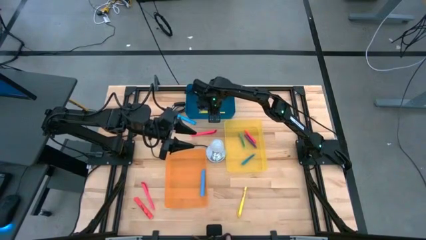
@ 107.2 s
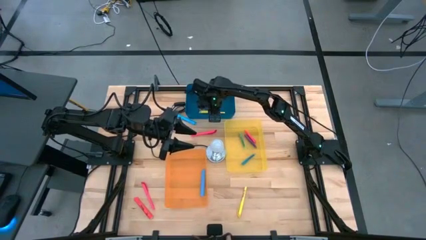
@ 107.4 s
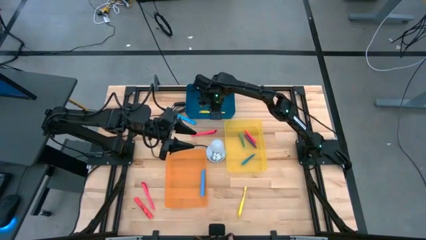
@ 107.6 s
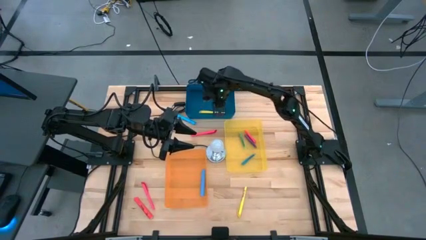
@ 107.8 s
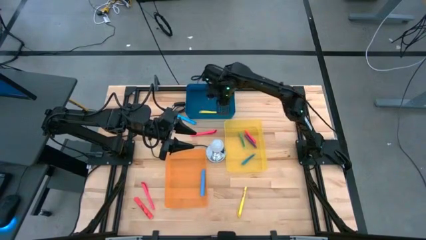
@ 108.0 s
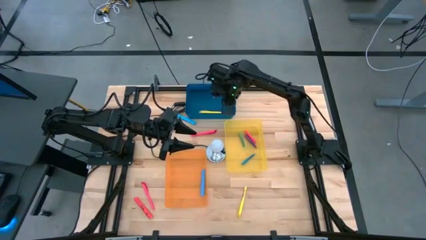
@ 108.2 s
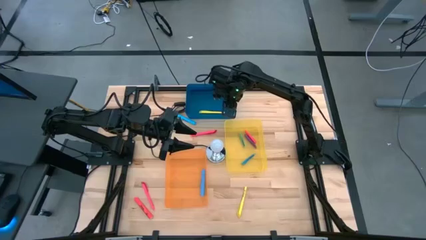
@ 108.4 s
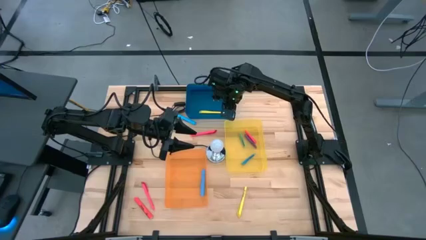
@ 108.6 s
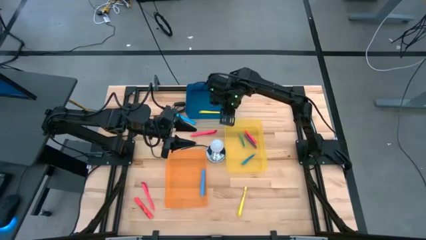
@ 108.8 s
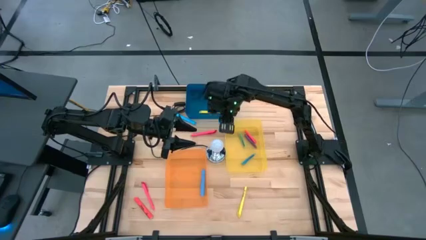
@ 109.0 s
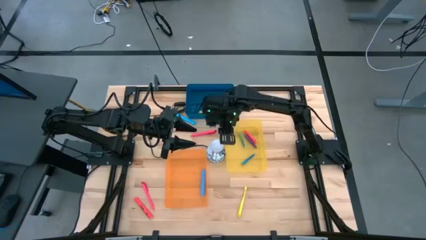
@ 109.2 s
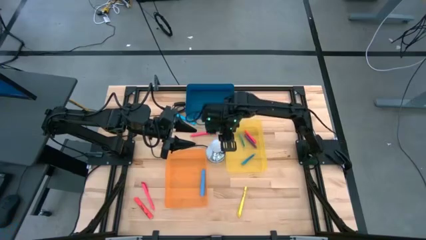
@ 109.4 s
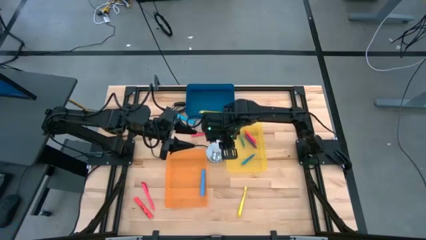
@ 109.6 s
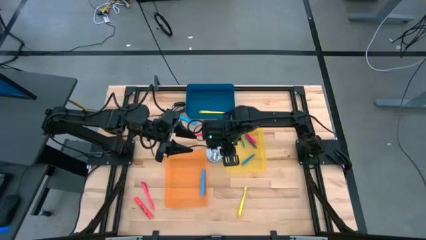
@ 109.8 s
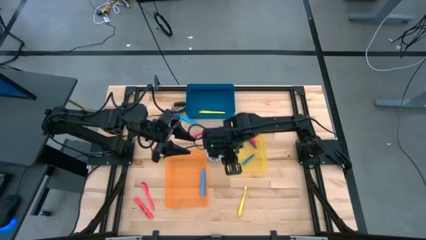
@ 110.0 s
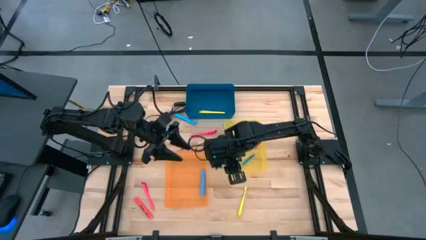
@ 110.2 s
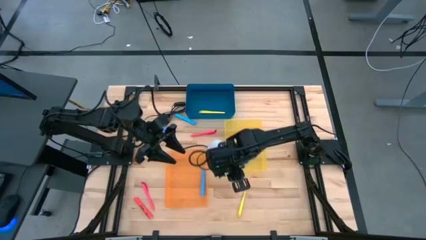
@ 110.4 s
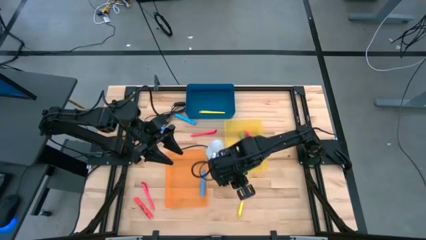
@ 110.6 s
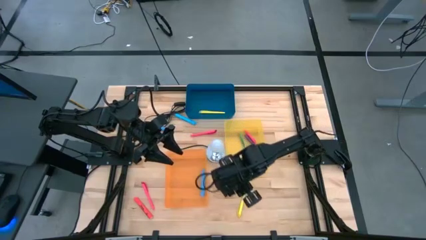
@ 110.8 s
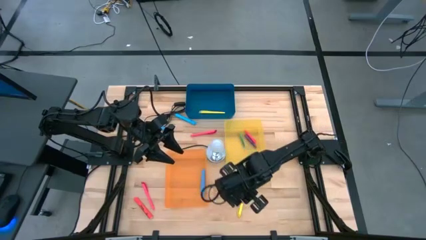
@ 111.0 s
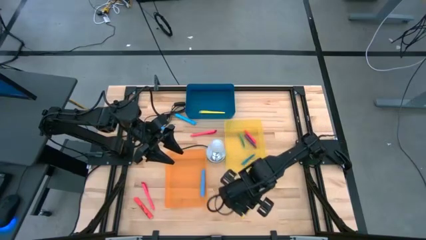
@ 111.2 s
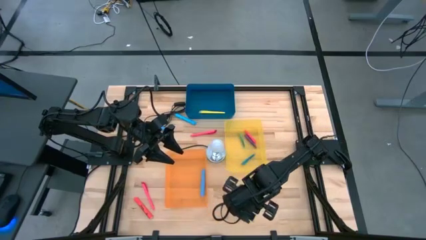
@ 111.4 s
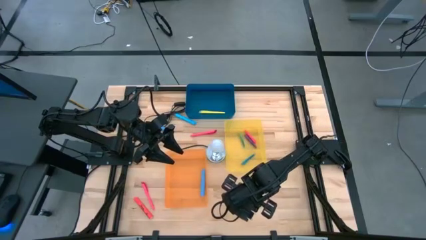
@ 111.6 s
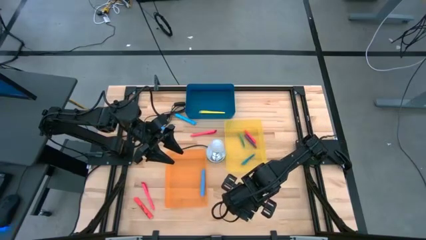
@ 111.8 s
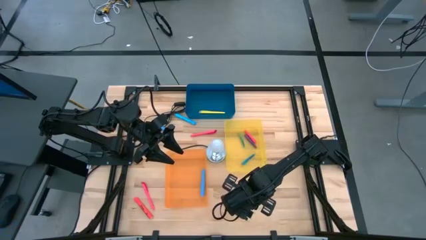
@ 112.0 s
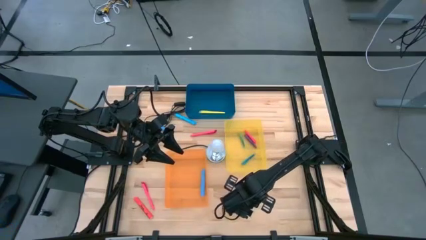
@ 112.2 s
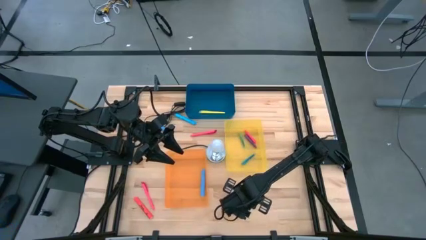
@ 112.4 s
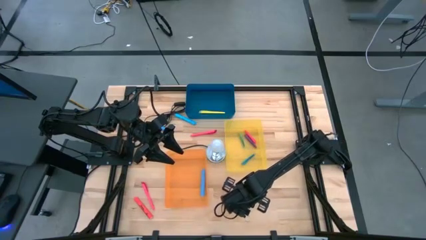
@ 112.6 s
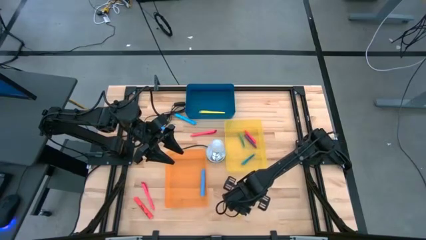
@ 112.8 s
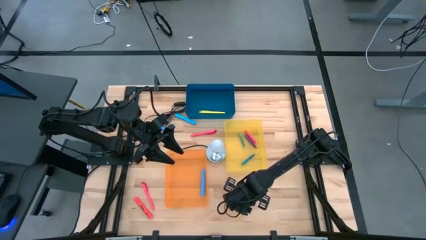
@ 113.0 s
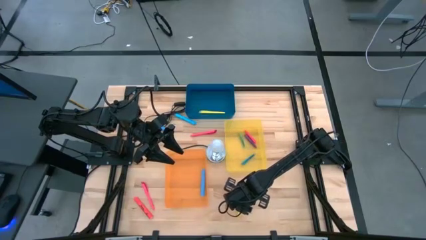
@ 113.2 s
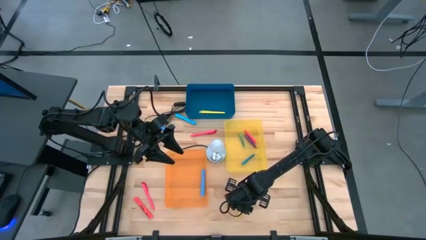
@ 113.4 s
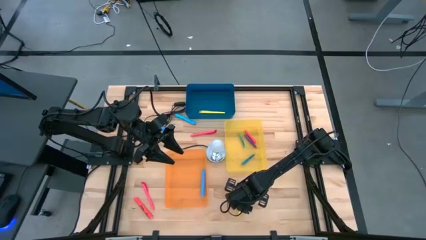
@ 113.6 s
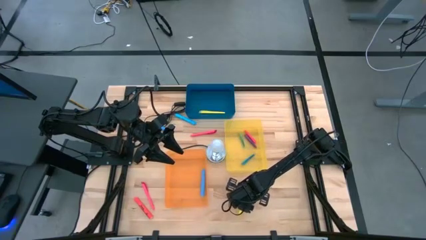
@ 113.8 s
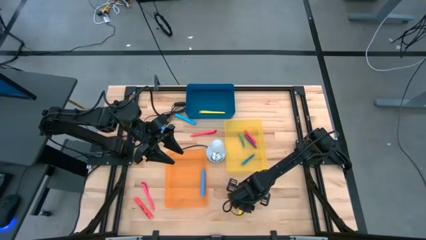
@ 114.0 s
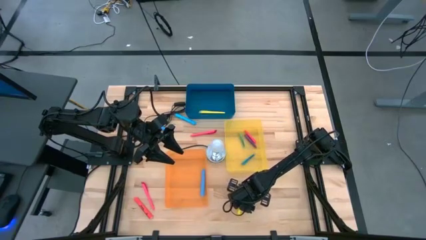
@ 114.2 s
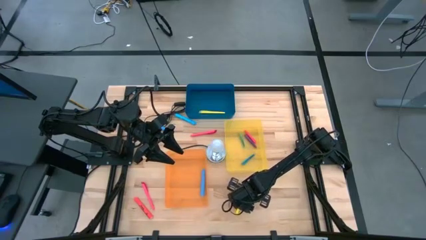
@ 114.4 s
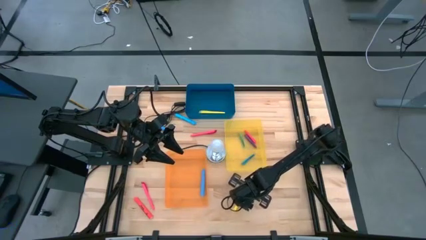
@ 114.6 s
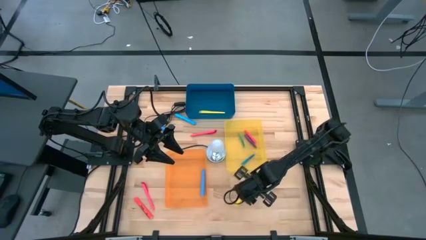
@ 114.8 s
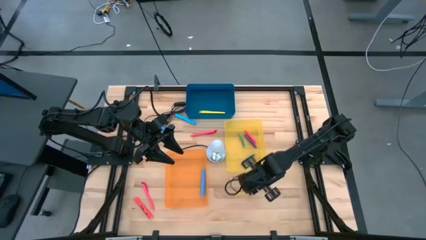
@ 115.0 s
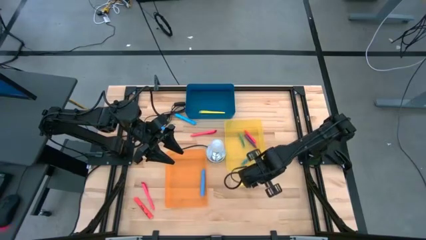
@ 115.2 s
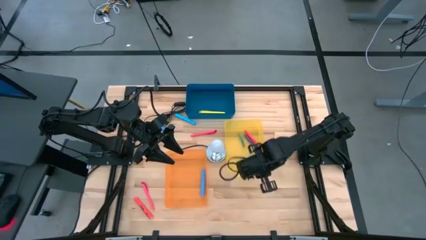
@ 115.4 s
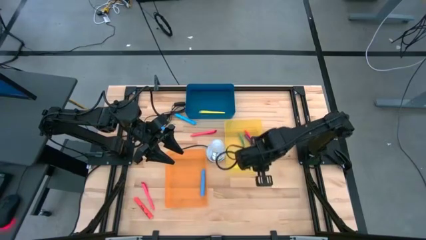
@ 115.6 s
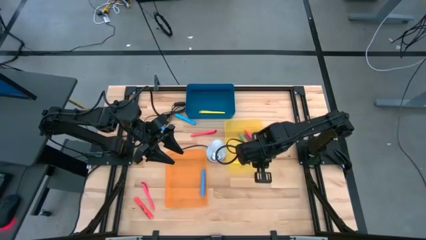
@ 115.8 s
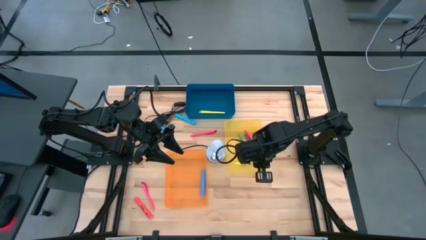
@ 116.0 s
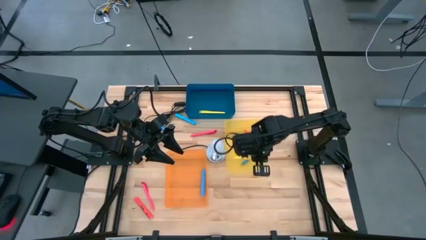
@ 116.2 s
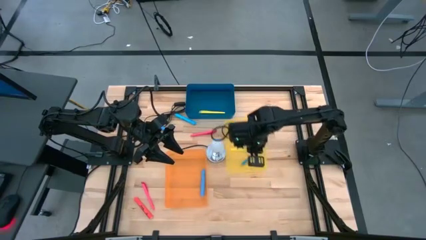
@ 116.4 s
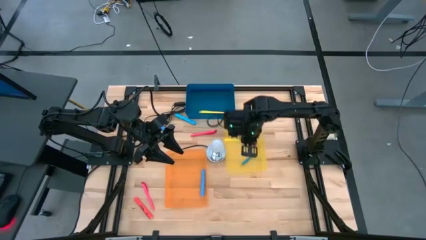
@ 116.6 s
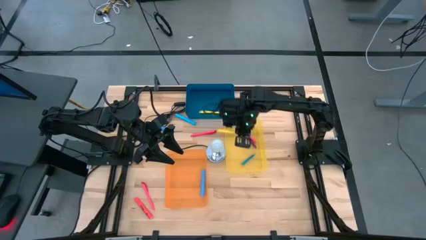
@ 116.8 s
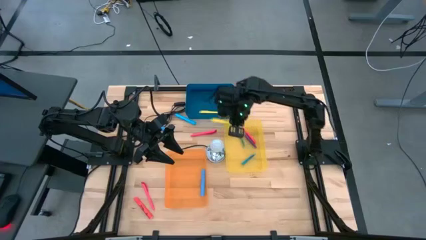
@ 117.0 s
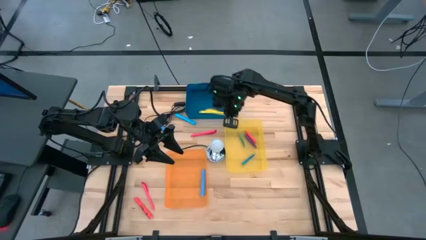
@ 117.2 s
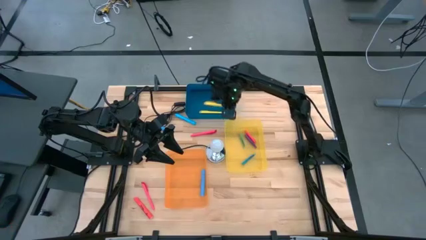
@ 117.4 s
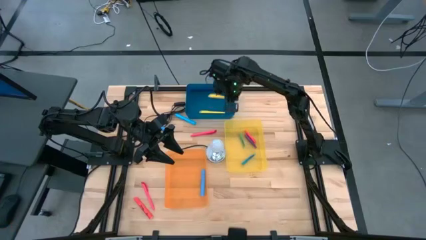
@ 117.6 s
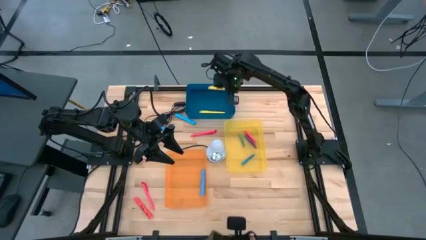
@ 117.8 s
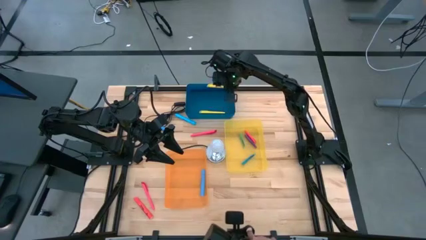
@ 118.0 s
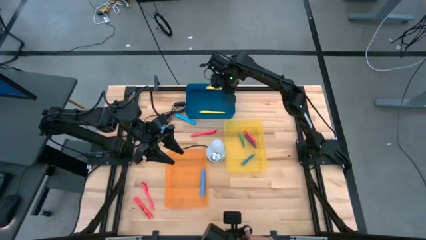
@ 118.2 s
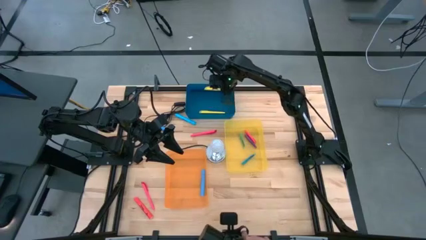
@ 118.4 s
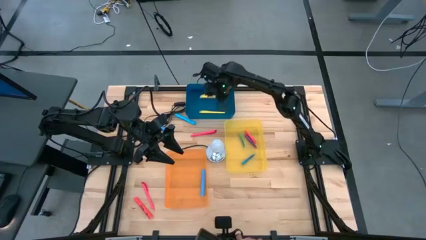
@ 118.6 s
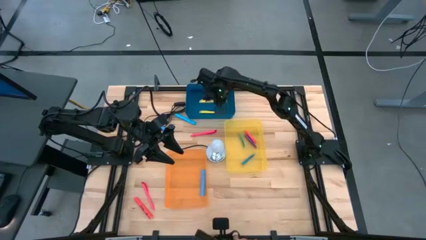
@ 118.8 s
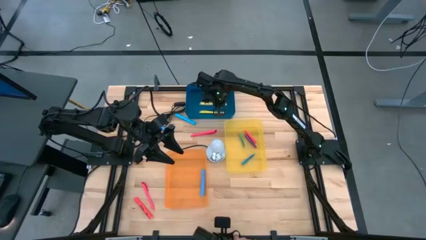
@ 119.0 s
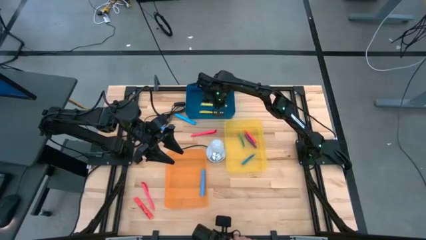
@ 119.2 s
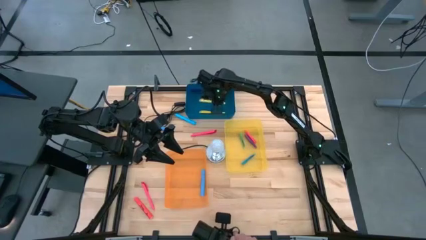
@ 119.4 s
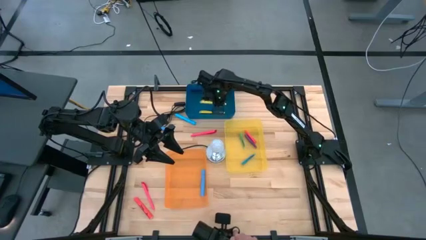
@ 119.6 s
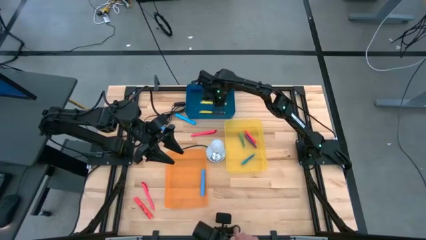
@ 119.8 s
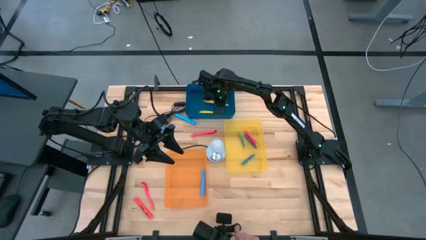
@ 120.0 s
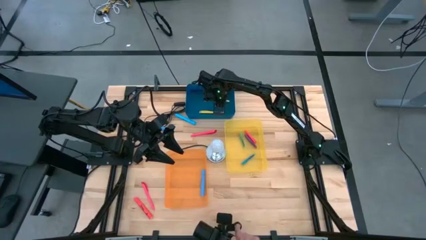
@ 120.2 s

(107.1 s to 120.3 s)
Task: Pick & Place Markers
Put the yellow pen into the blue bin
